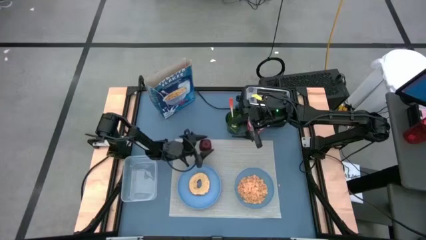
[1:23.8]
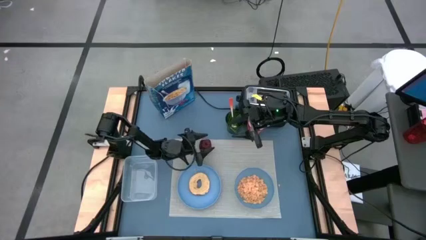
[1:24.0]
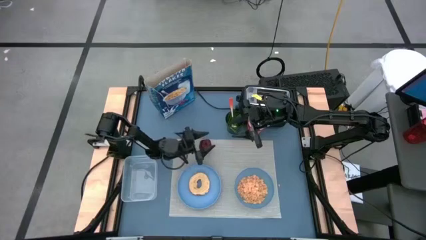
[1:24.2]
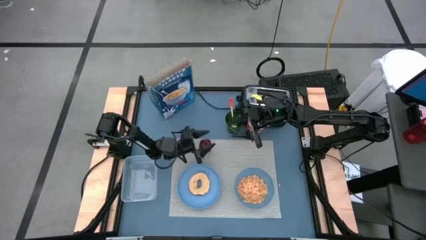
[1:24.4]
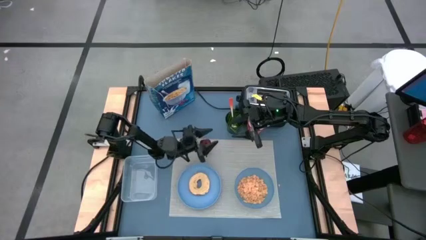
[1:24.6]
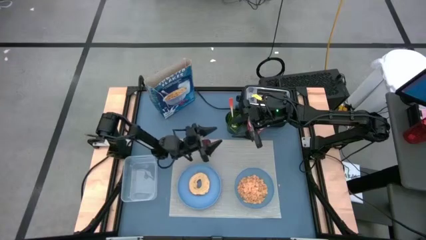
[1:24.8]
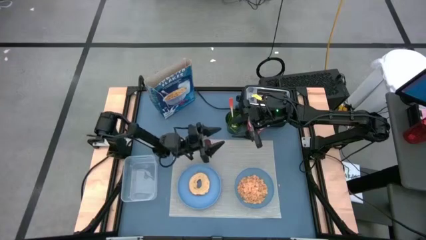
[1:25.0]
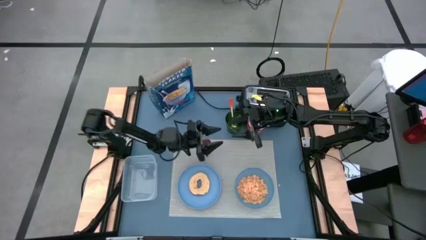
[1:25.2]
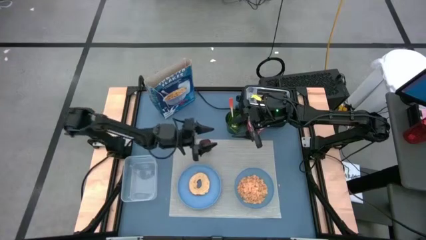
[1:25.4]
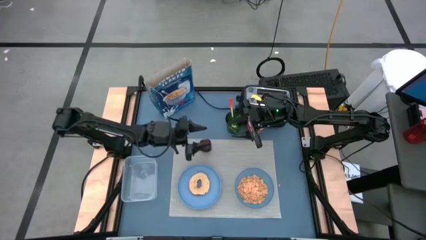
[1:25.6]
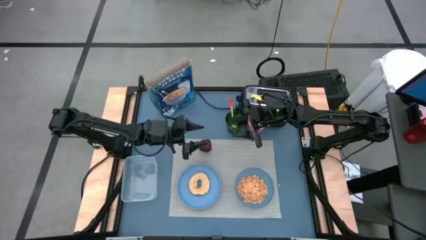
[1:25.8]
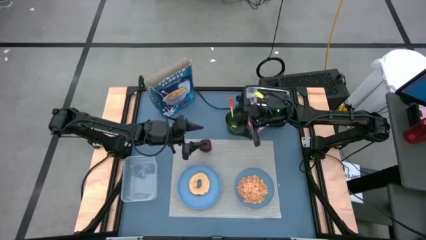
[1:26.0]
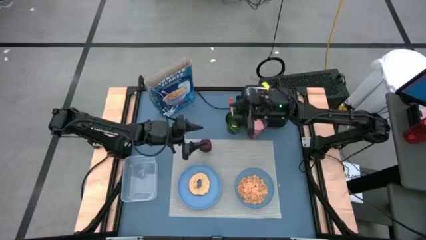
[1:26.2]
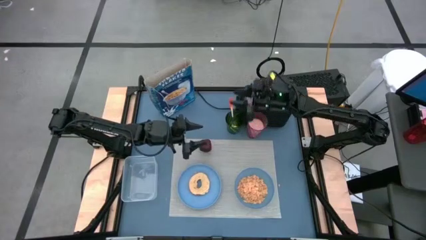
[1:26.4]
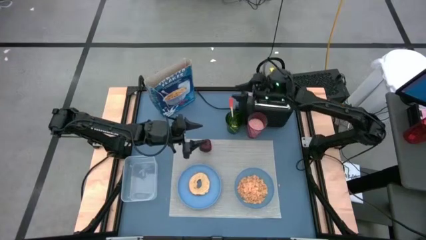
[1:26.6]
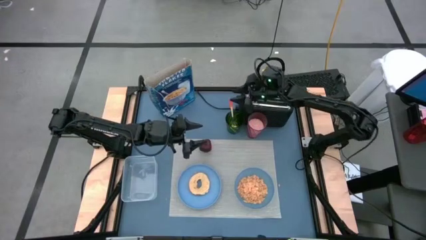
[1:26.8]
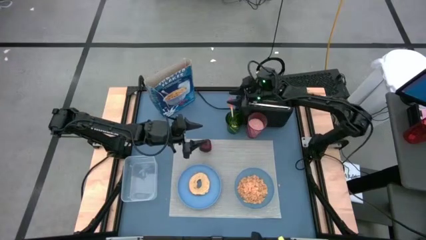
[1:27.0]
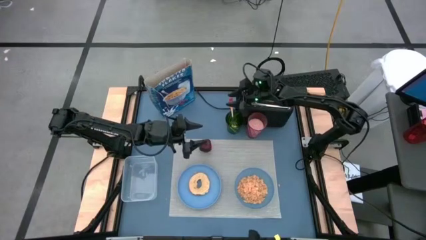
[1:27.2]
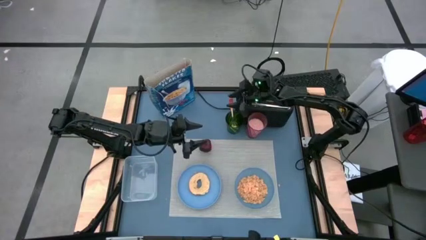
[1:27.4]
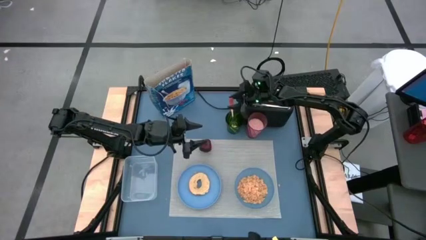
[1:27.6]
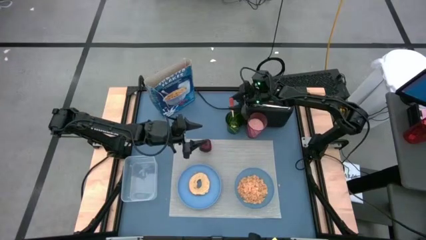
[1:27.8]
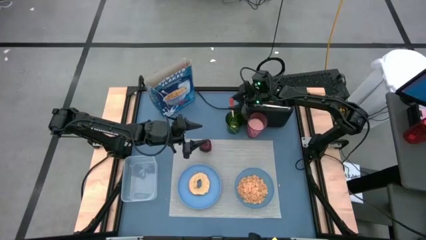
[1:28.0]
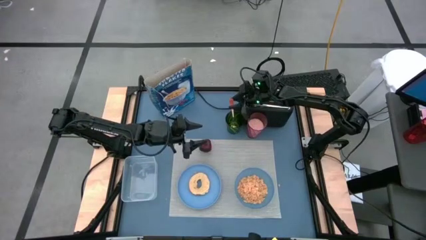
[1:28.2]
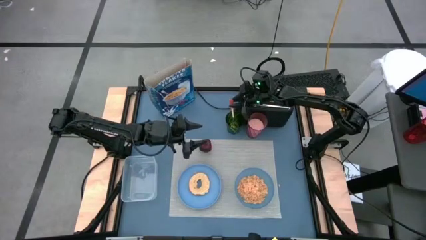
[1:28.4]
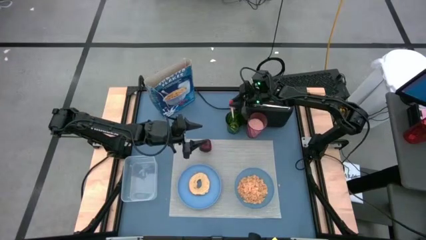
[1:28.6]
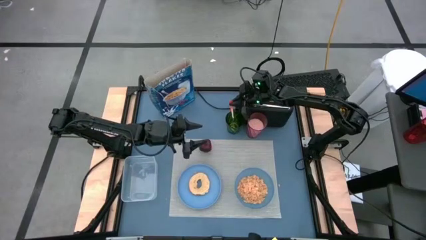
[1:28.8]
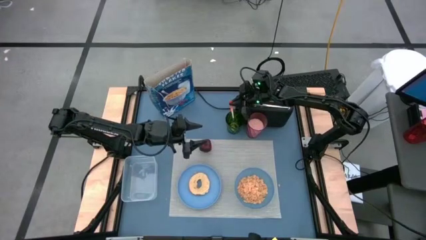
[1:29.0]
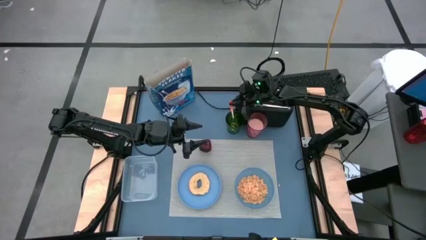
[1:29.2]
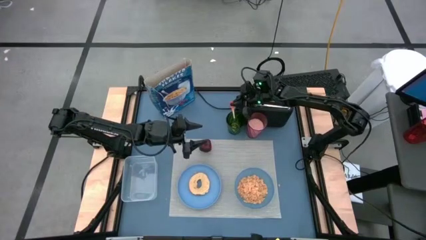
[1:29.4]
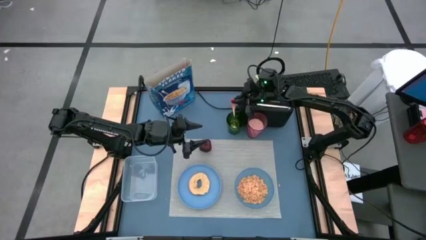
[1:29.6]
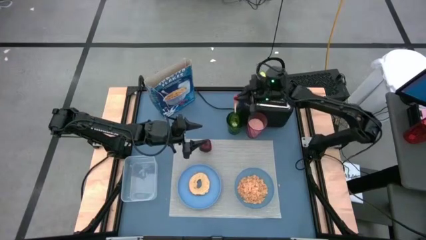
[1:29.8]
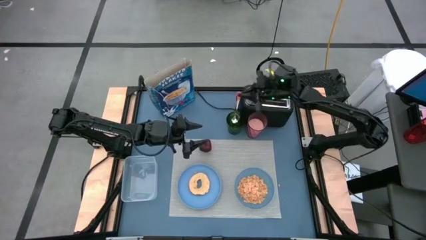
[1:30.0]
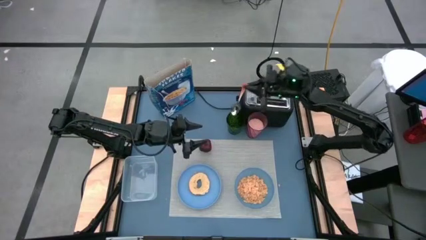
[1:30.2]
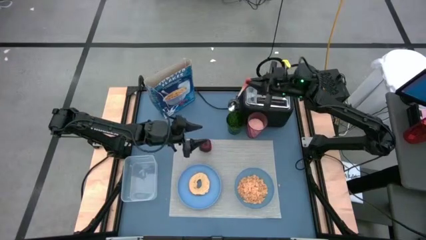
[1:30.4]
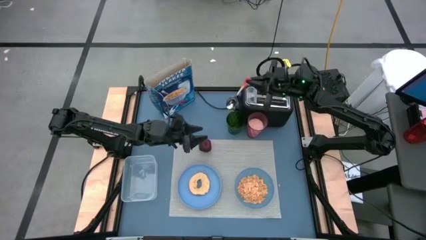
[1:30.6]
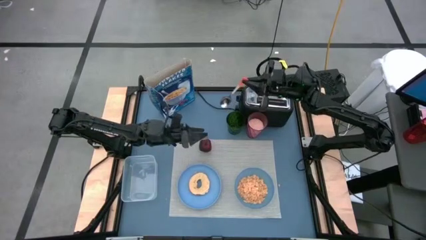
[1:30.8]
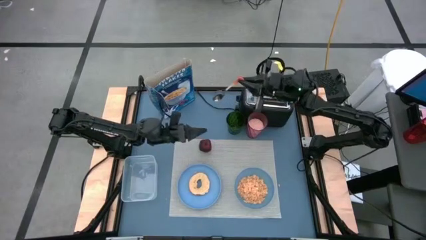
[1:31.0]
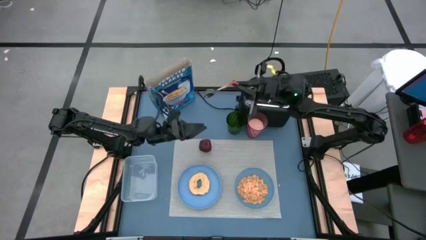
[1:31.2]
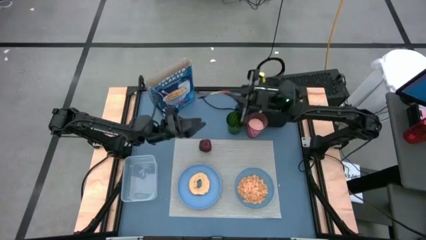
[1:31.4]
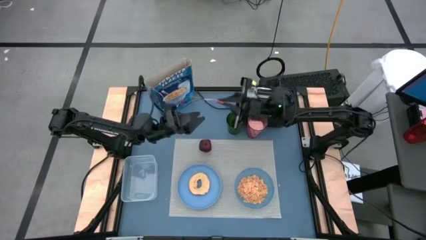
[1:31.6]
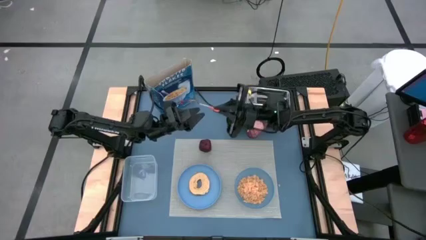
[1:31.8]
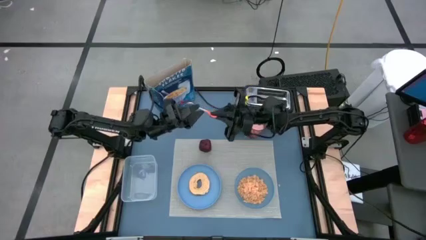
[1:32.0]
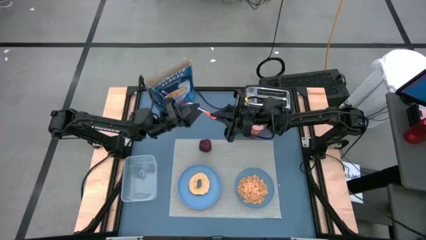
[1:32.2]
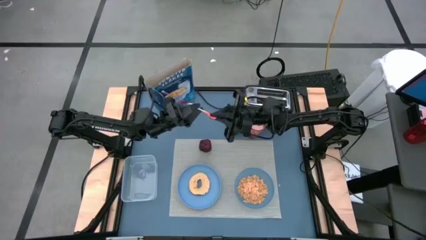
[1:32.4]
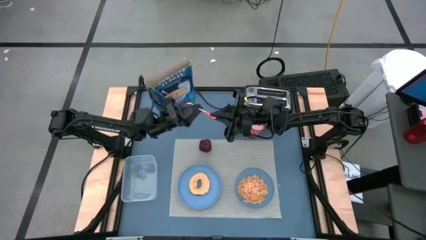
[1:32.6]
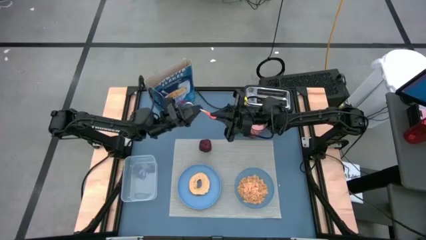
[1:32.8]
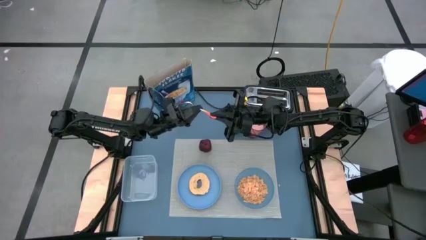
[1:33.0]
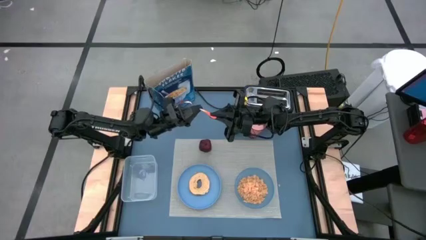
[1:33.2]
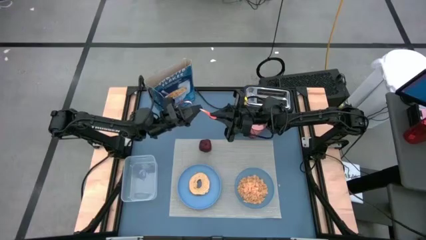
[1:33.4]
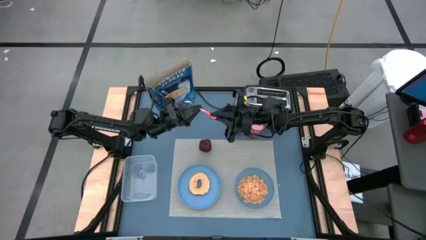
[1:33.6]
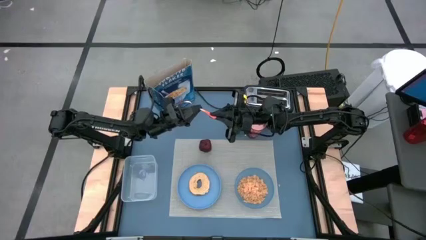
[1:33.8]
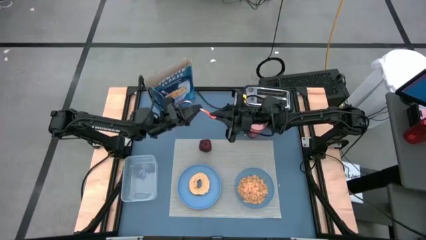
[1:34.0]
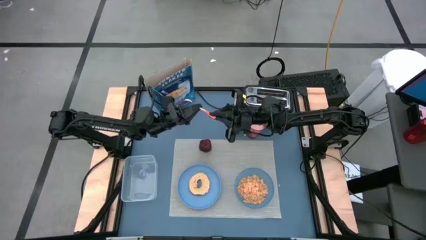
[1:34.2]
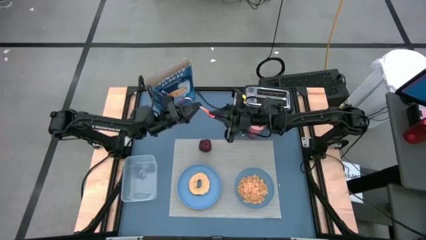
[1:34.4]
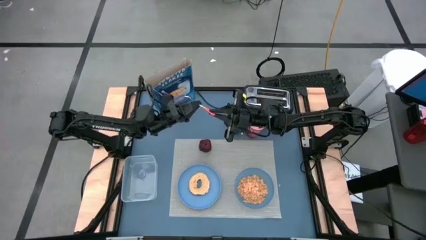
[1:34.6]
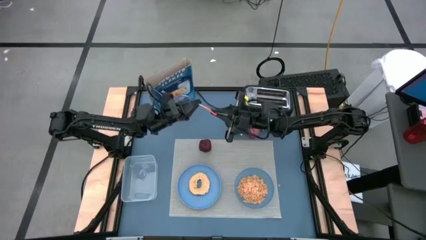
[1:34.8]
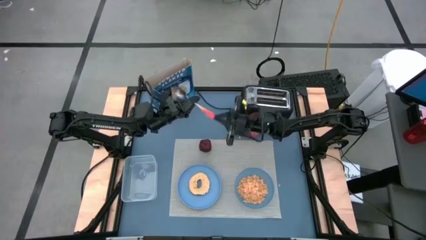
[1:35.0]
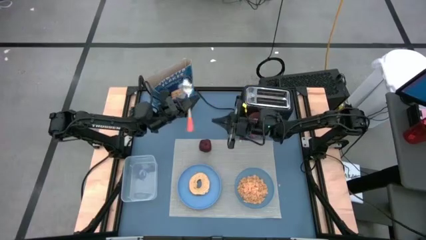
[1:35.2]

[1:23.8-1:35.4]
Task: Arrange a breakfast setting
Put the orange spoon on the gray placemat

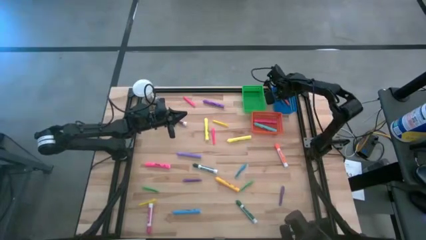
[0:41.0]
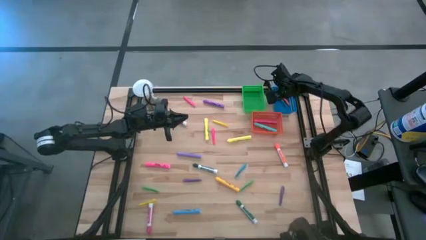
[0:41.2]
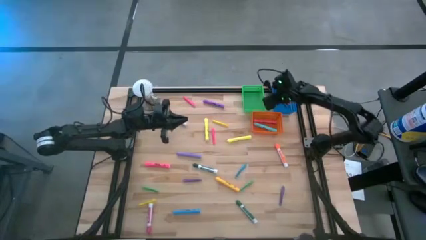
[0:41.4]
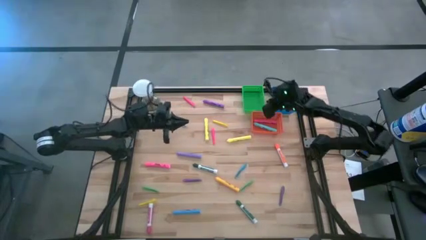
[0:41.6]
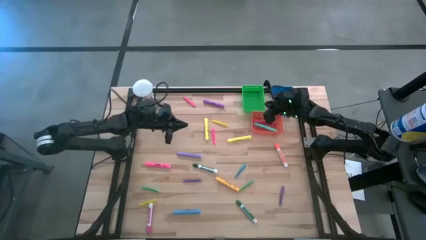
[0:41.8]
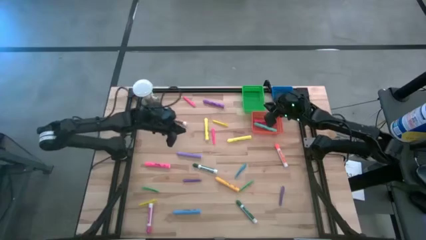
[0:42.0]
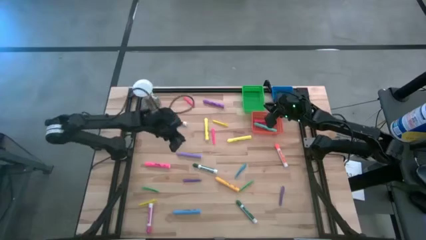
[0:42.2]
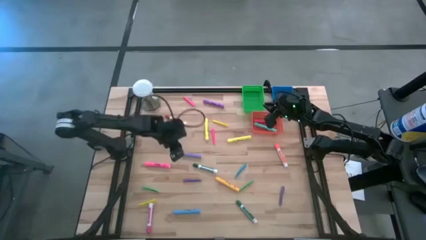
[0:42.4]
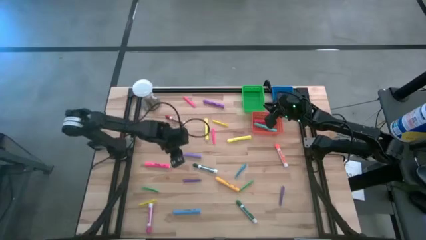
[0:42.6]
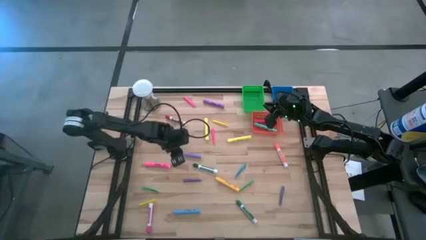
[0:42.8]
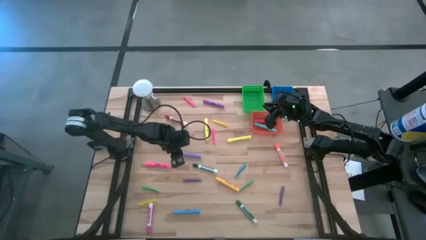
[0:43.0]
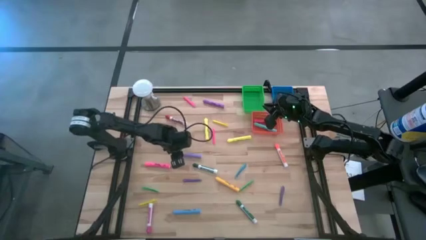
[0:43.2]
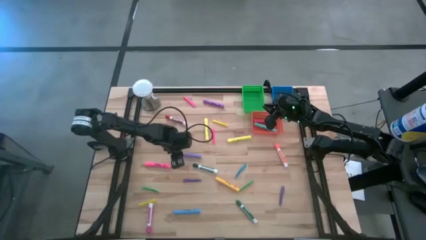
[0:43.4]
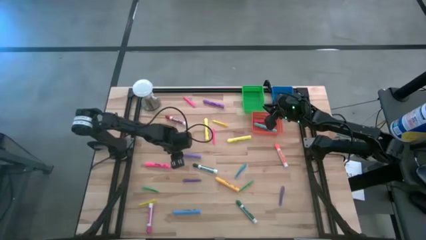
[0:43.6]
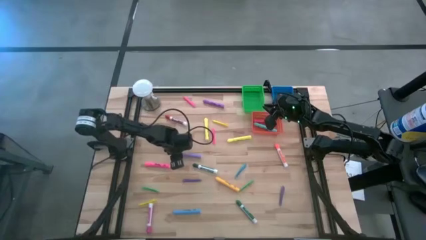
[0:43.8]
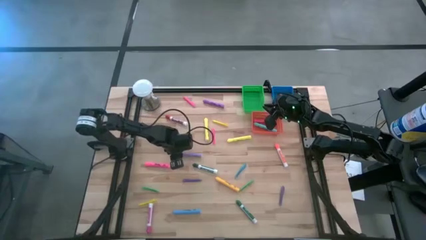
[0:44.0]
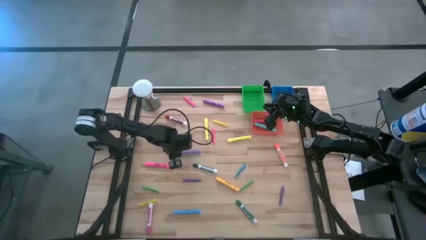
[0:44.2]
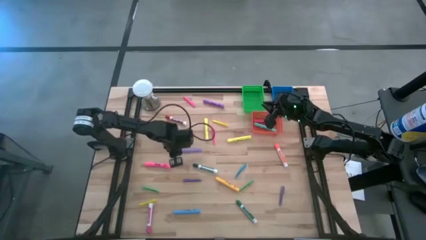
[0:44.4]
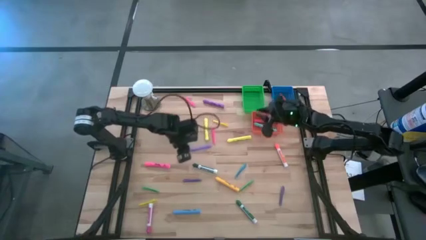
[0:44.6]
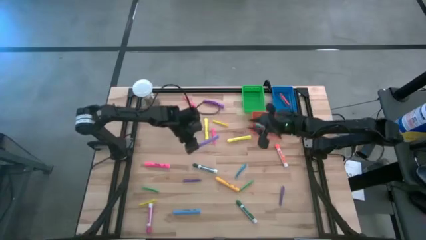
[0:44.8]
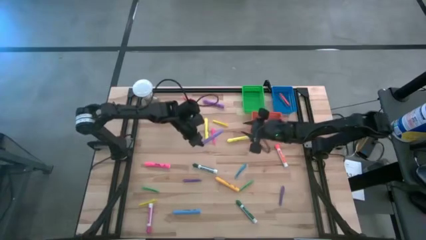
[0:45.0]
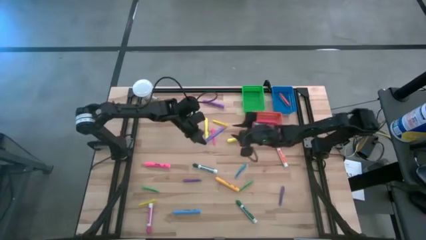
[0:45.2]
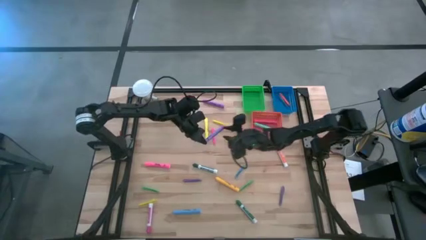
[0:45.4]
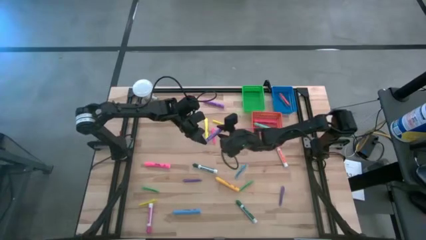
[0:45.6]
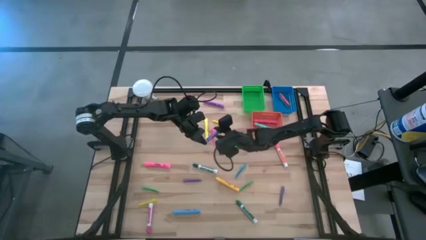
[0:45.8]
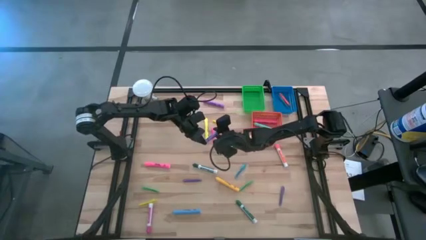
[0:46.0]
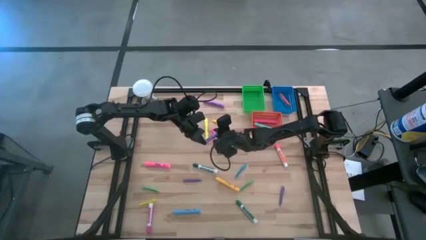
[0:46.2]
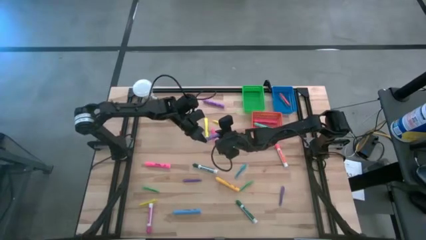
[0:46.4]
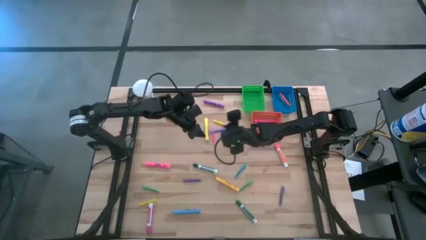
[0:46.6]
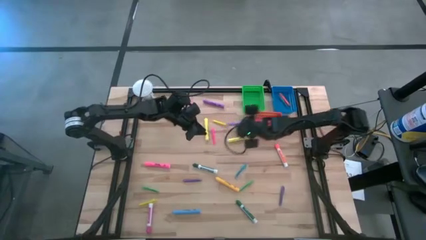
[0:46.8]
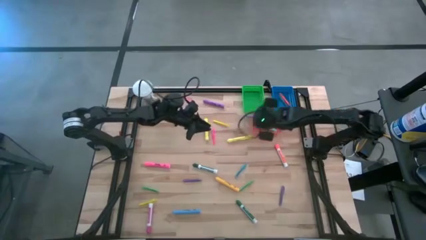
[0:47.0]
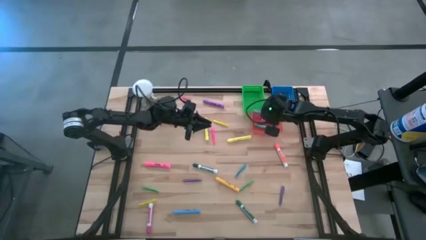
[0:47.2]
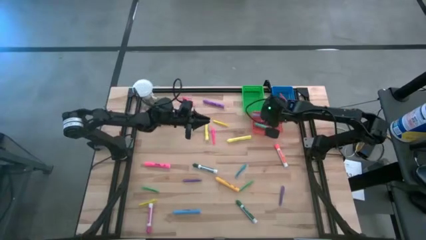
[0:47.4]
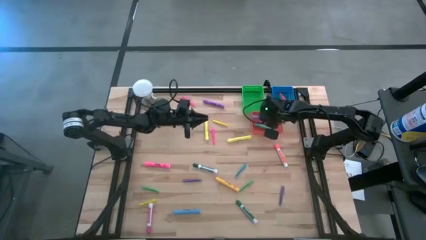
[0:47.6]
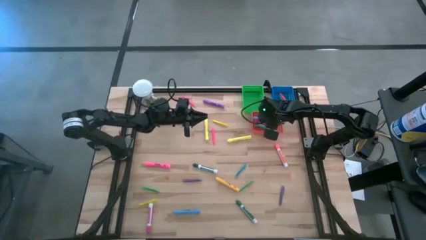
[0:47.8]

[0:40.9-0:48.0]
Task: Pick & Place Markers
Put the light violet highlighter pen into the orange bin
